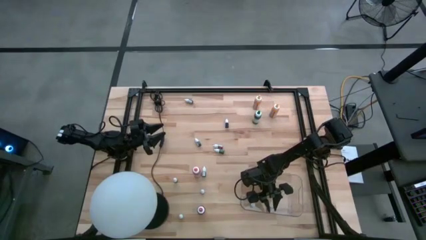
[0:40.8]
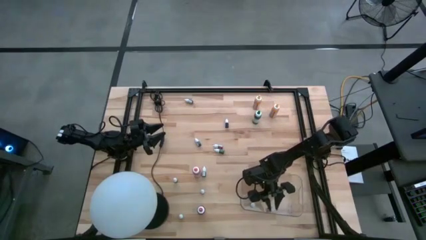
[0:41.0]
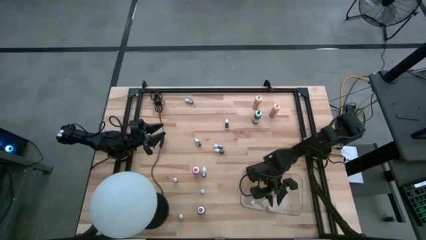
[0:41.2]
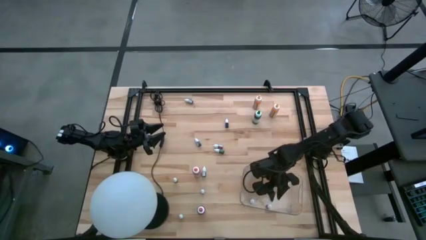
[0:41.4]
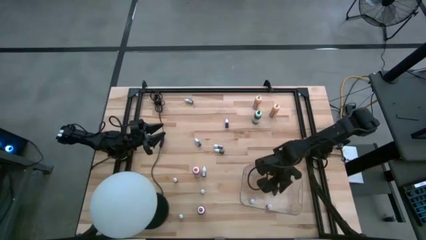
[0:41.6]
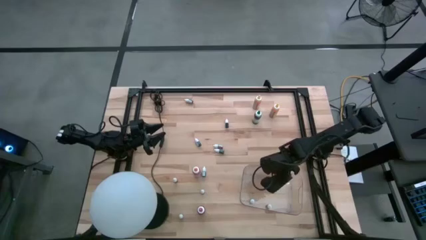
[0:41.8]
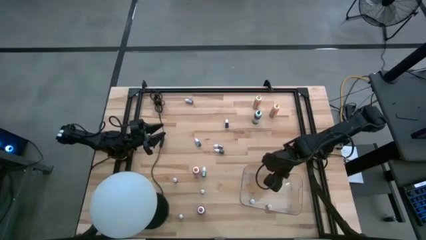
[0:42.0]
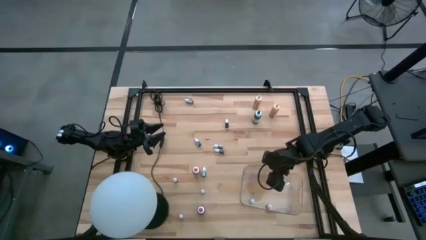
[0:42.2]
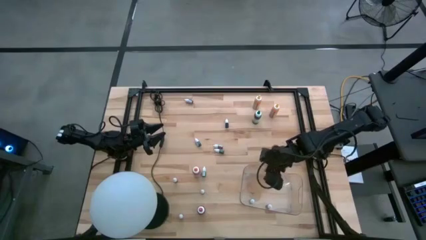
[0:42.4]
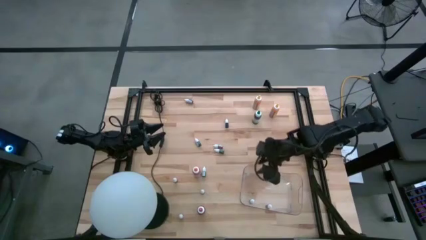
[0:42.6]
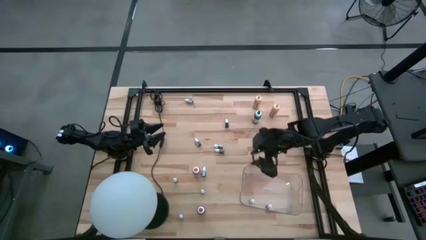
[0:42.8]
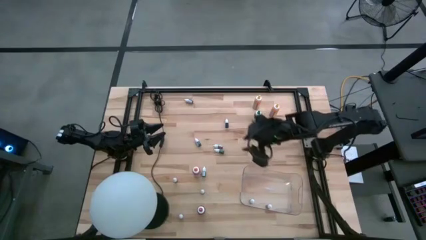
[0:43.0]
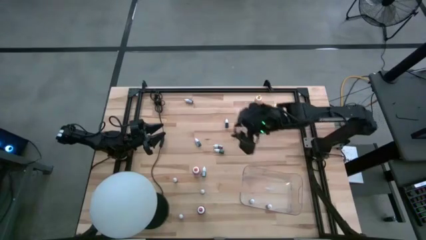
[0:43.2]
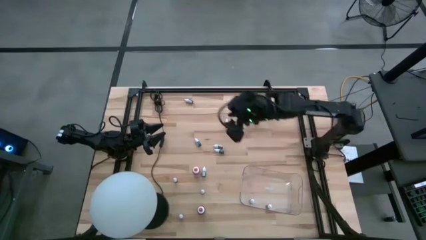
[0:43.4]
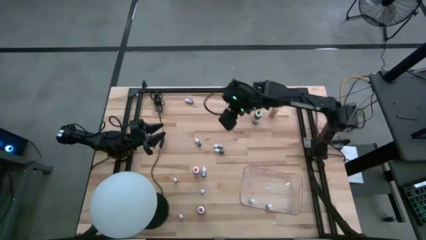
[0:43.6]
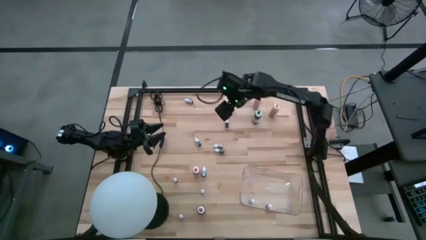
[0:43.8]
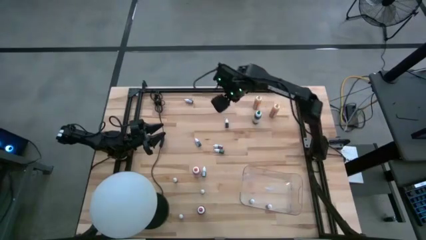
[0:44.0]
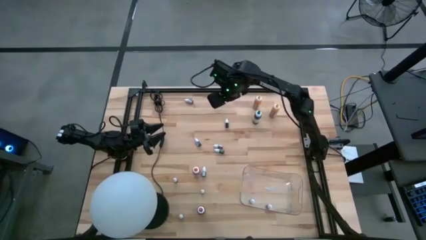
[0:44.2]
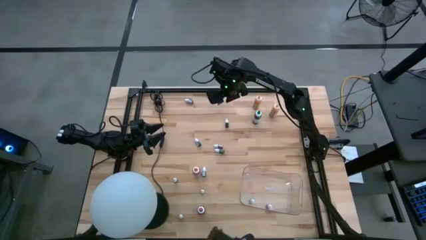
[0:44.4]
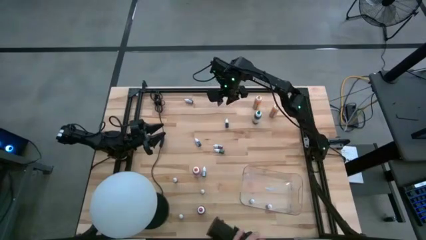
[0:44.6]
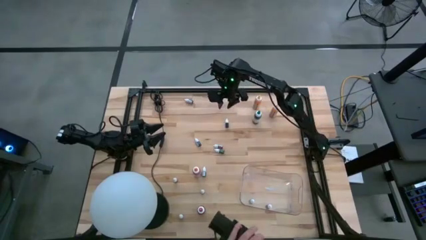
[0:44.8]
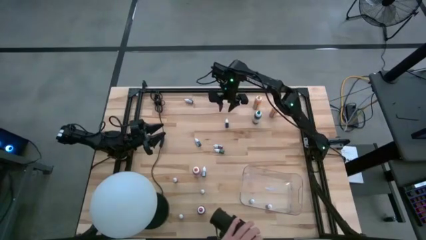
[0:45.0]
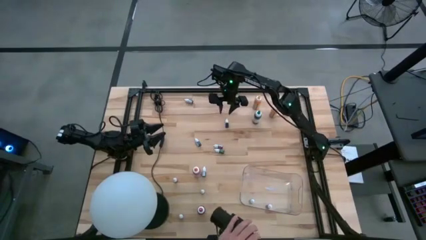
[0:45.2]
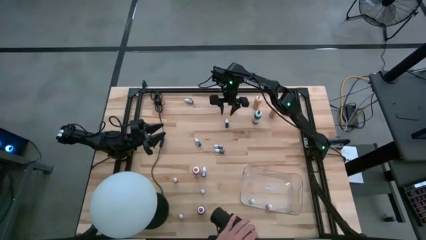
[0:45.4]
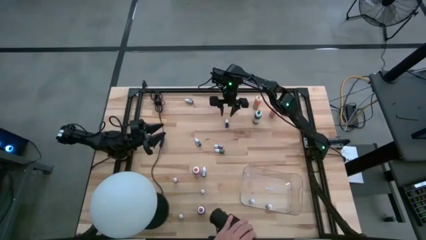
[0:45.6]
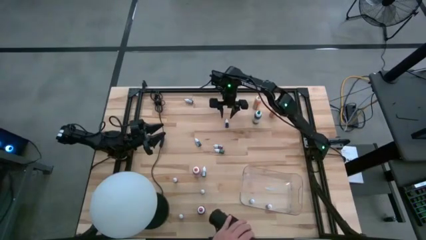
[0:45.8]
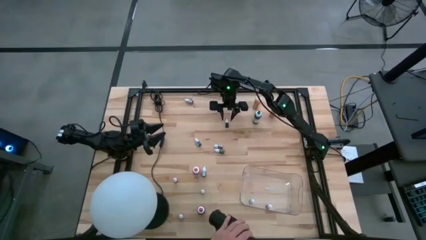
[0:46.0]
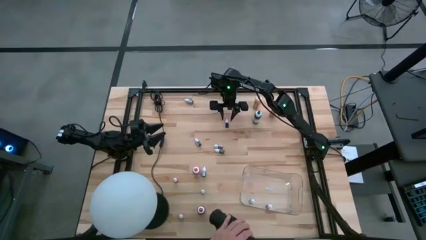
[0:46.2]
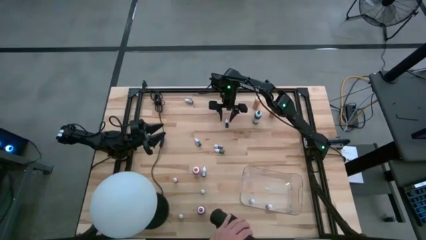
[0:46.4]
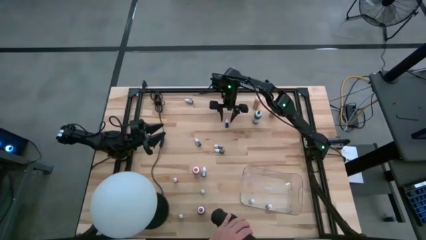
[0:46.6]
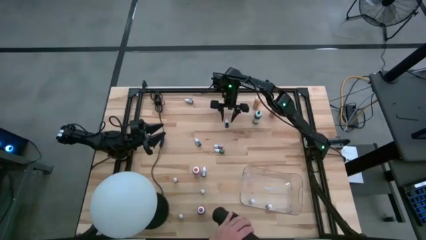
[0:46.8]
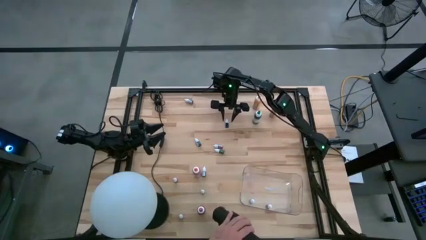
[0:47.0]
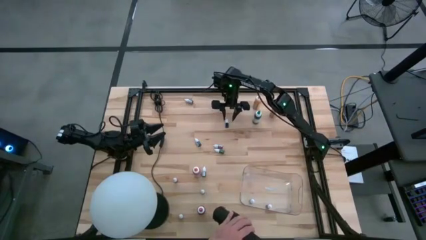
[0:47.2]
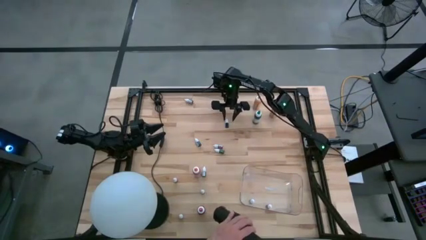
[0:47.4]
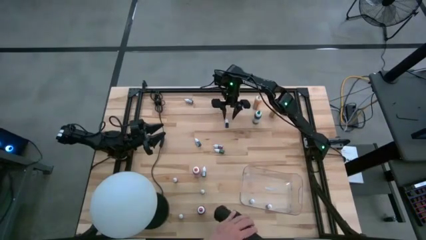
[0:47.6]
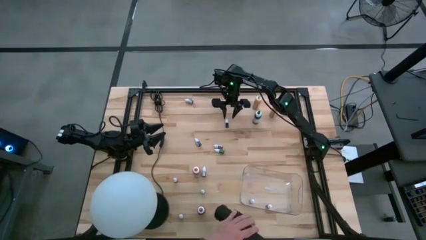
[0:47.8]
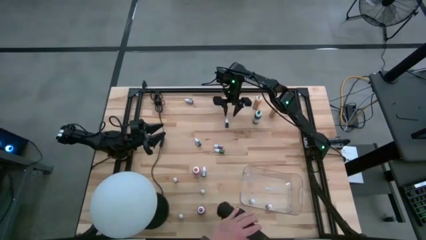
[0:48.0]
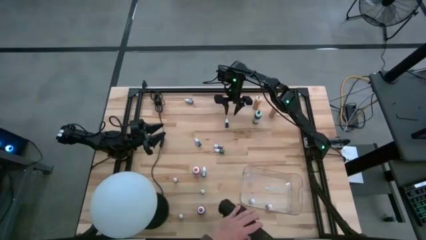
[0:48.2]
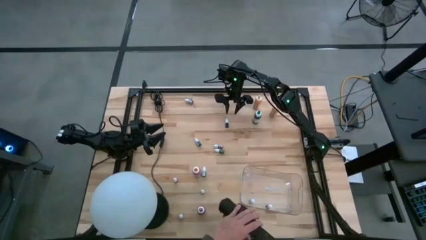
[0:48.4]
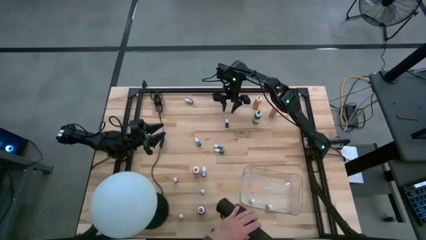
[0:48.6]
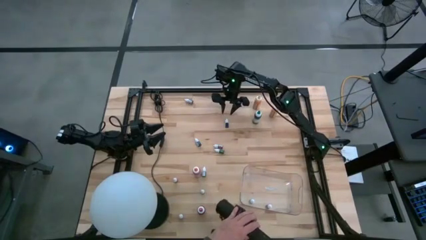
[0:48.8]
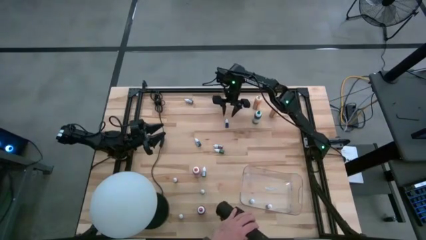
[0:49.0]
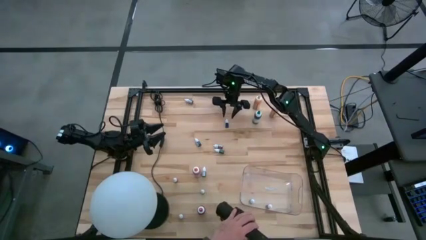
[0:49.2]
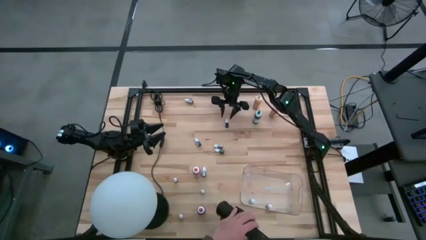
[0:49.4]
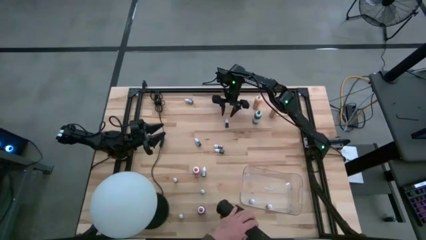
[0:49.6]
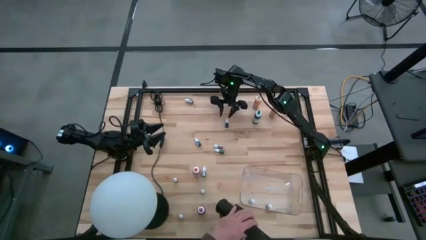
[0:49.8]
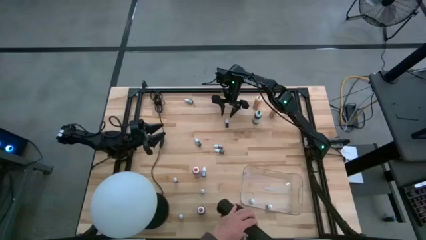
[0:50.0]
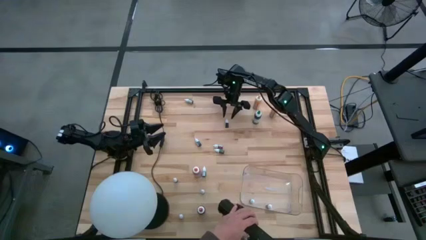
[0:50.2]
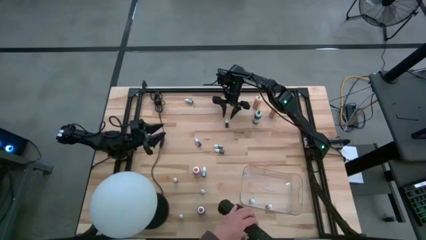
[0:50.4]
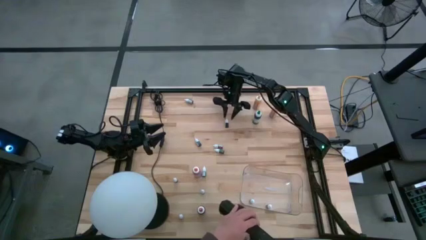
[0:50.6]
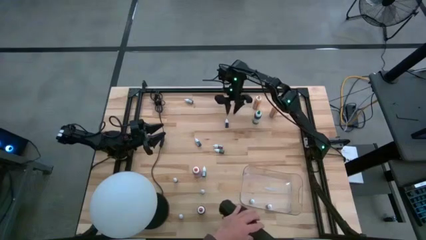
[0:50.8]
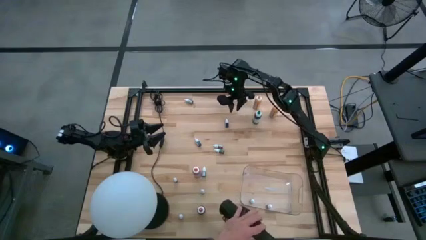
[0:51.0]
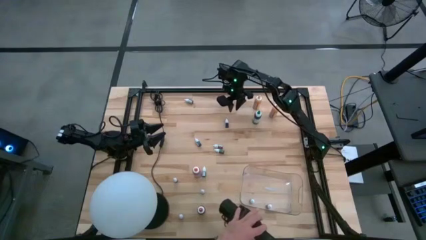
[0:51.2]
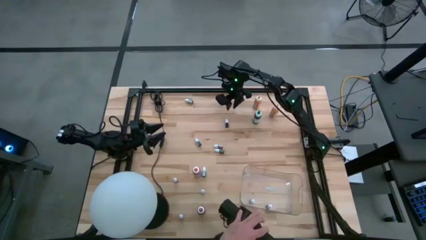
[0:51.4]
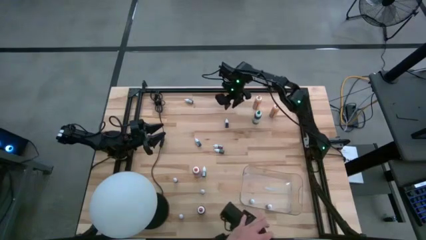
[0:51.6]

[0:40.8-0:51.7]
Task: Pick & Place food coloring
Put the black food color into the transparent bin

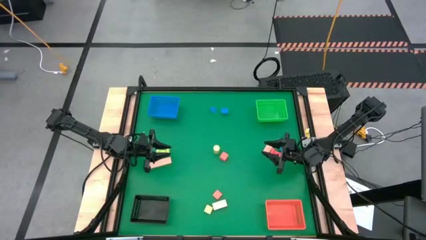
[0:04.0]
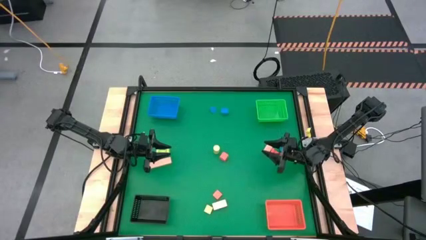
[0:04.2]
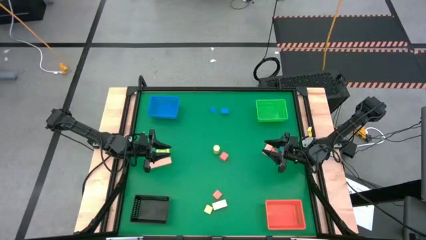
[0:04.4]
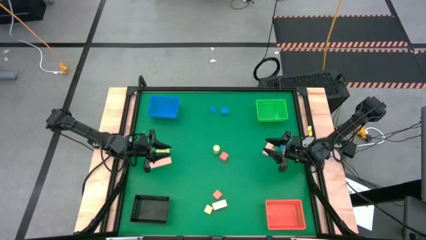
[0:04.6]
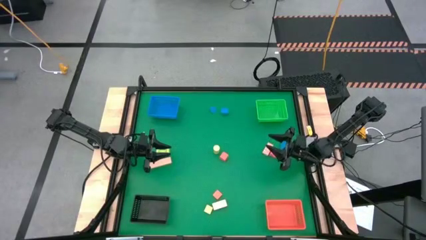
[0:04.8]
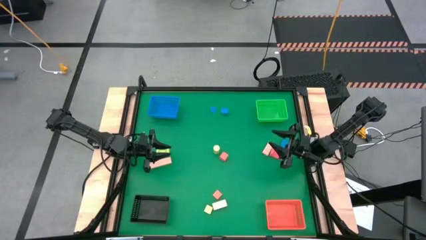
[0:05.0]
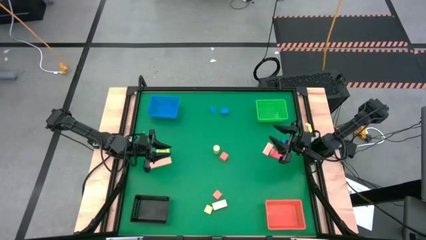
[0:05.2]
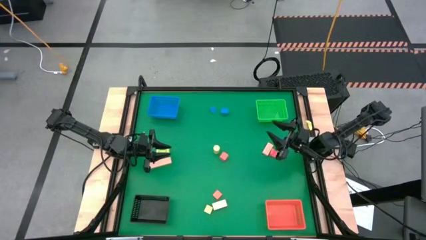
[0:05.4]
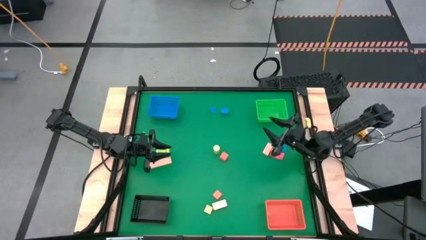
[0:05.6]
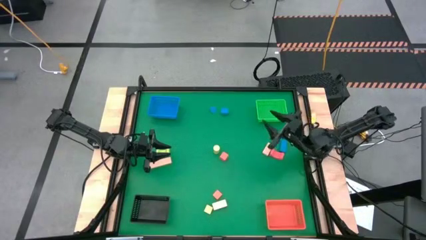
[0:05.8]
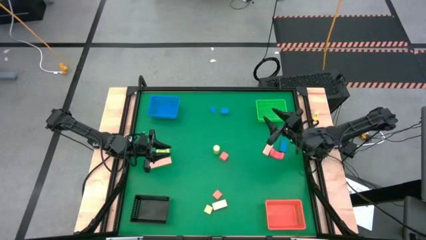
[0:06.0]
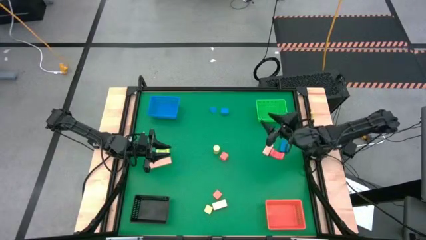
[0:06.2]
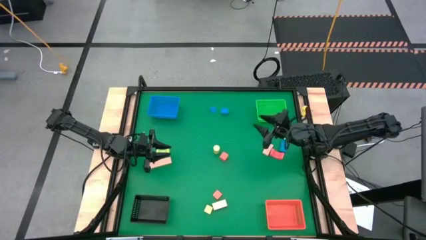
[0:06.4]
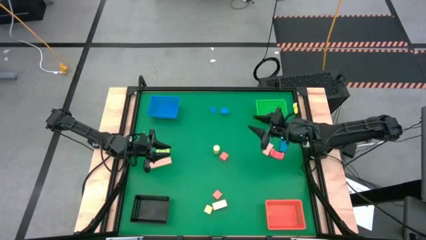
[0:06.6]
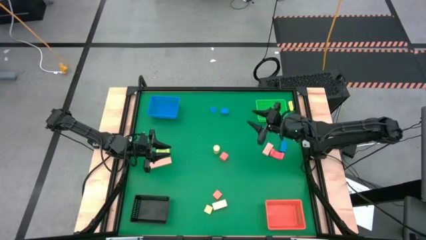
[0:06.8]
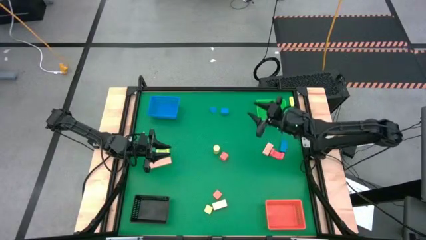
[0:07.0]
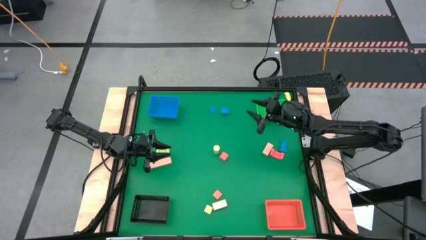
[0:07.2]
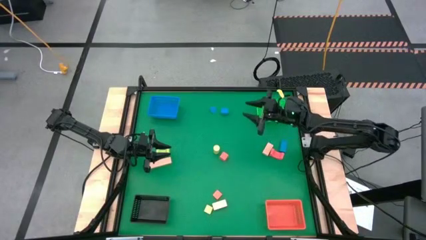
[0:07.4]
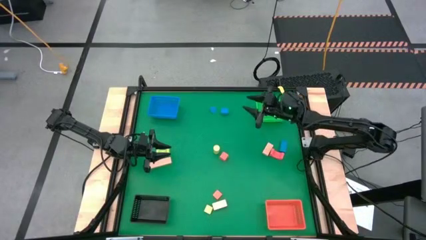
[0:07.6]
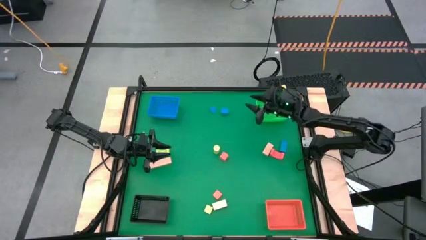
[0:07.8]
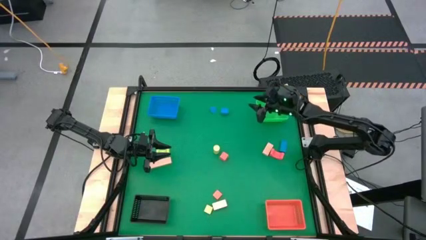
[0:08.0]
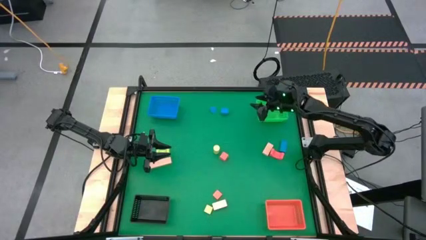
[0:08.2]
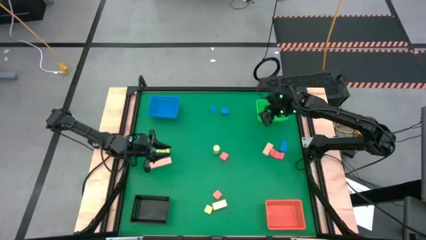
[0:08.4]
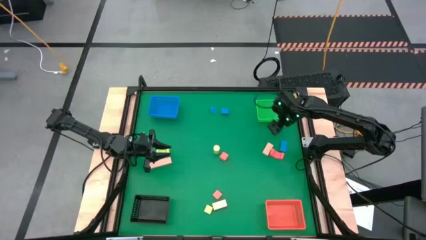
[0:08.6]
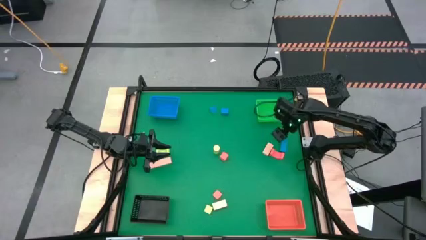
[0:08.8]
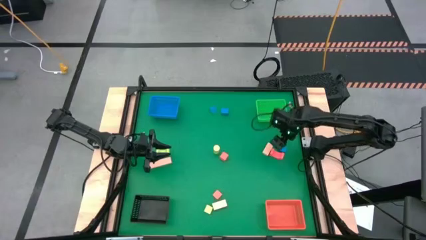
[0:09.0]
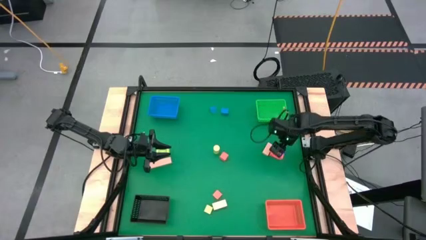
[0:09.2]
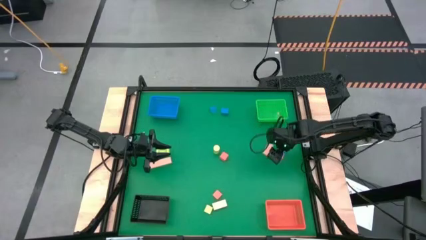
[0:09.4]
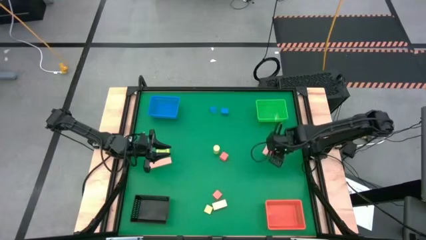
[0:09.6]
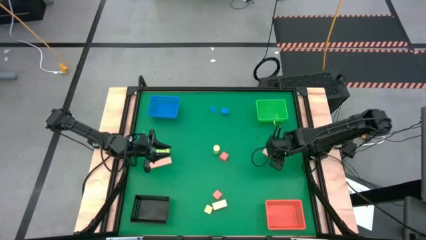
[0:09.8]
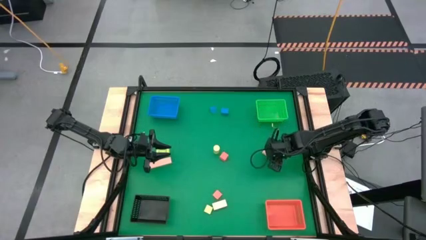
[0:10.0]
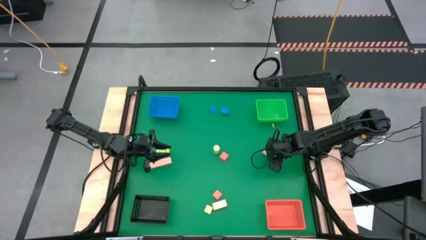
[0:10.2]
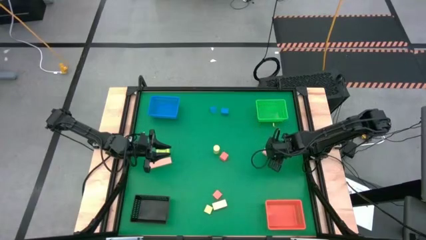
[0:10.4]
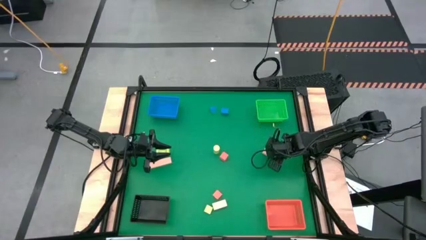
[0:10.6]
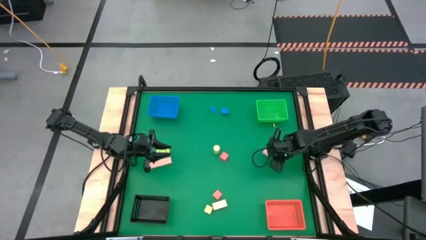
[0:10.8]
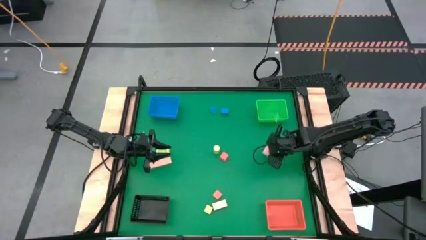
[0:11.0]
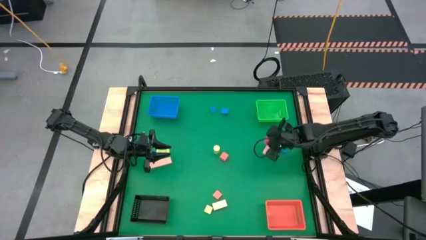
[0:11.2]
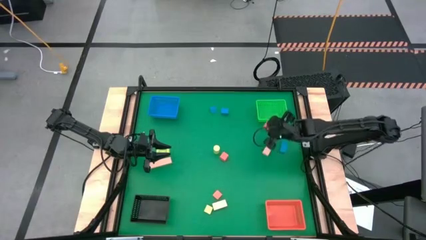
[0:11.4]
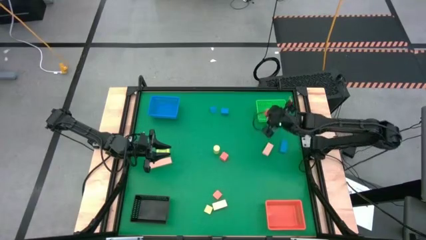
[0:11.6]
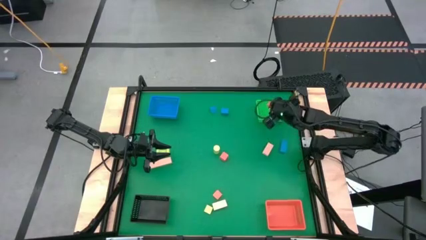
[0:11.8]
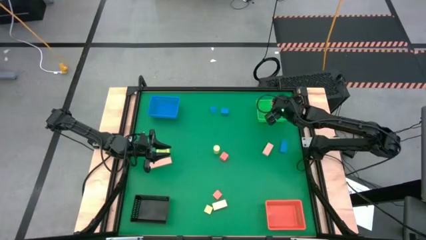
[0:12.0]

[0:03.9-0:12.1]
Task: Sort & place blocks by color
Put the top right orange block into the green bin
